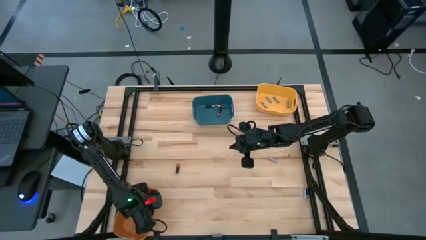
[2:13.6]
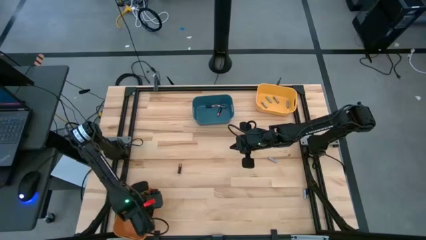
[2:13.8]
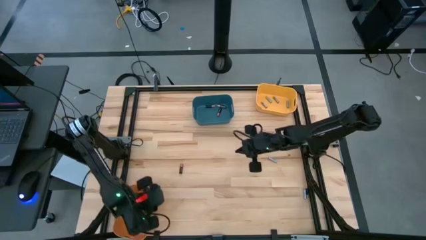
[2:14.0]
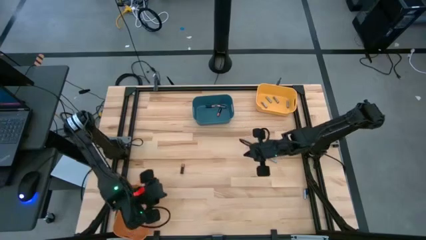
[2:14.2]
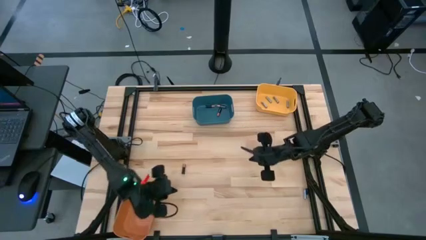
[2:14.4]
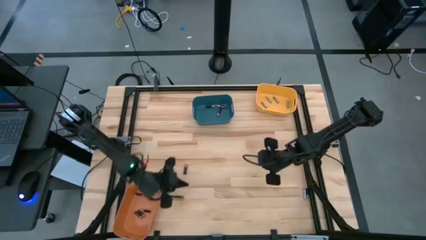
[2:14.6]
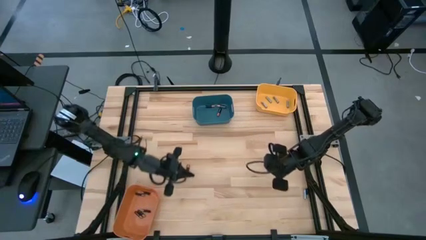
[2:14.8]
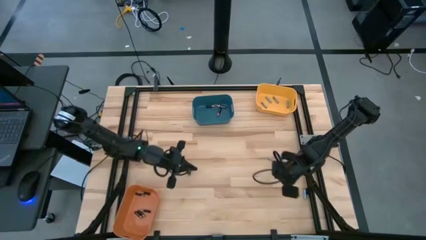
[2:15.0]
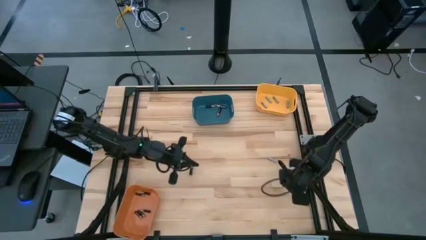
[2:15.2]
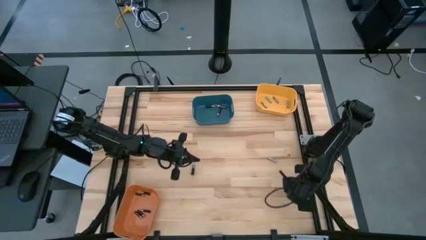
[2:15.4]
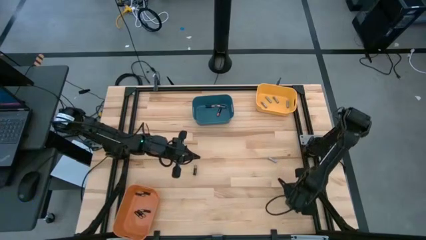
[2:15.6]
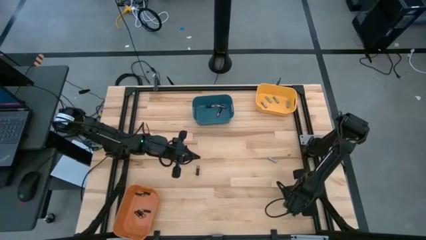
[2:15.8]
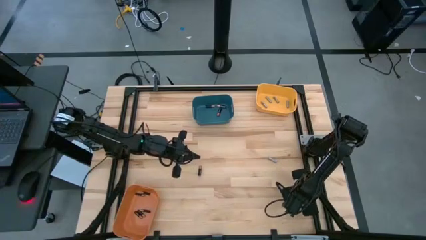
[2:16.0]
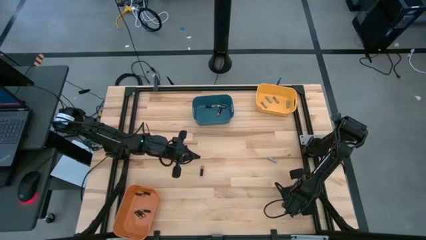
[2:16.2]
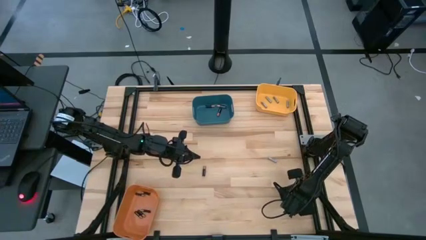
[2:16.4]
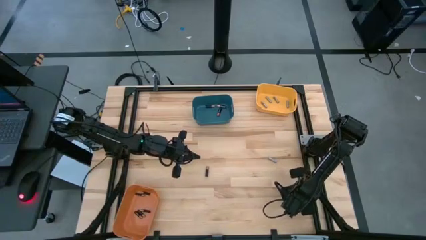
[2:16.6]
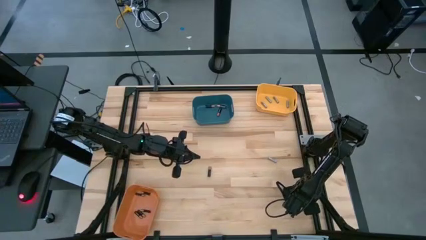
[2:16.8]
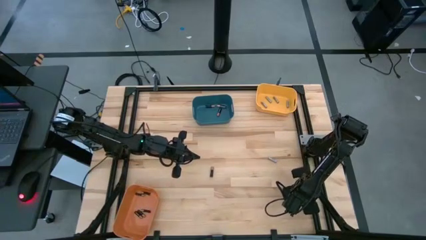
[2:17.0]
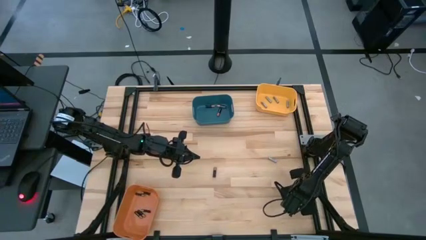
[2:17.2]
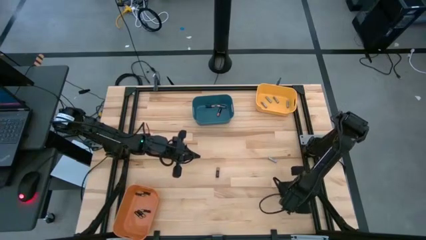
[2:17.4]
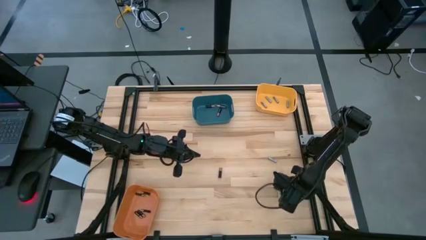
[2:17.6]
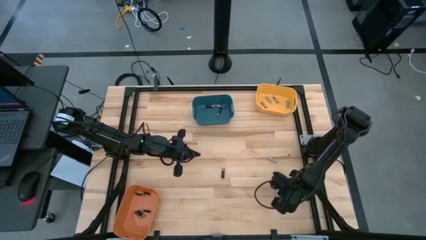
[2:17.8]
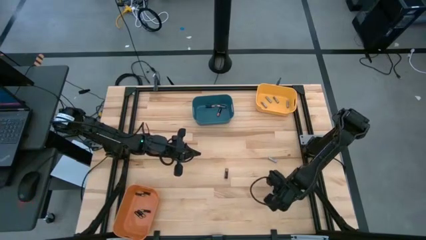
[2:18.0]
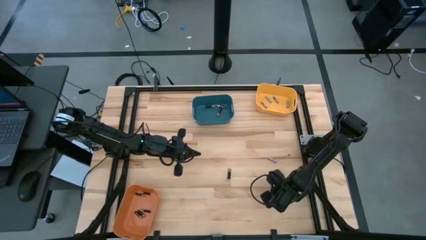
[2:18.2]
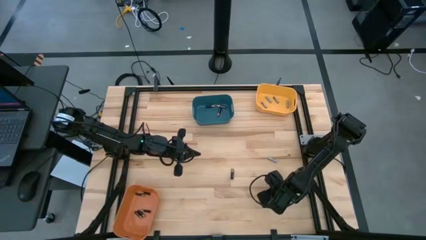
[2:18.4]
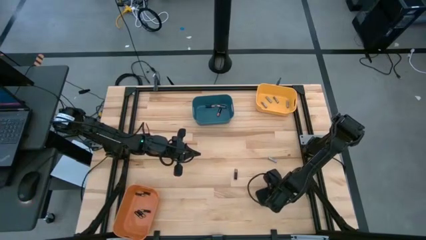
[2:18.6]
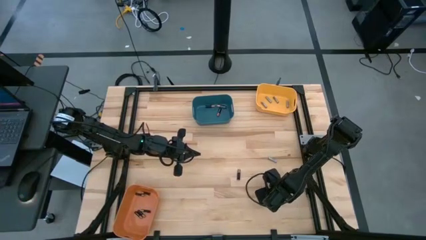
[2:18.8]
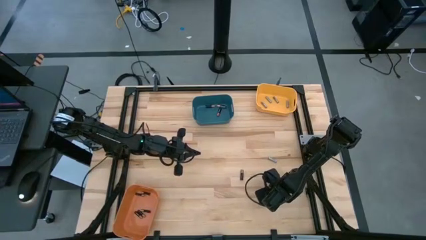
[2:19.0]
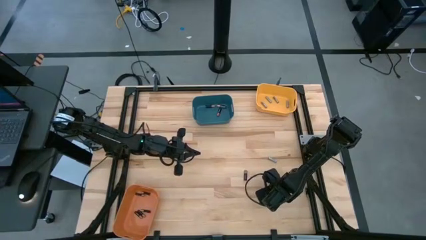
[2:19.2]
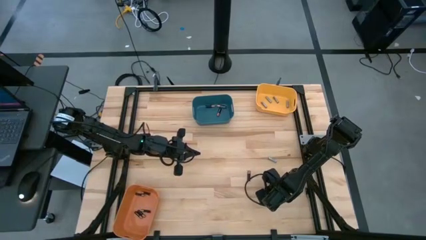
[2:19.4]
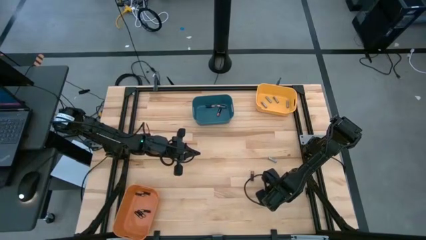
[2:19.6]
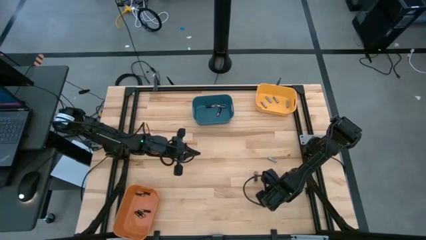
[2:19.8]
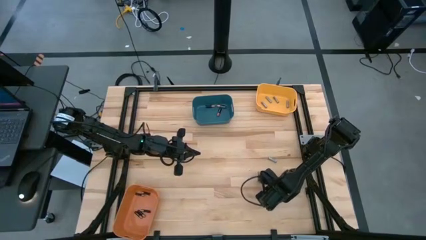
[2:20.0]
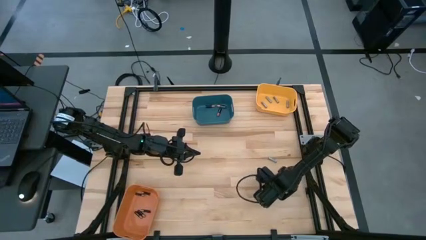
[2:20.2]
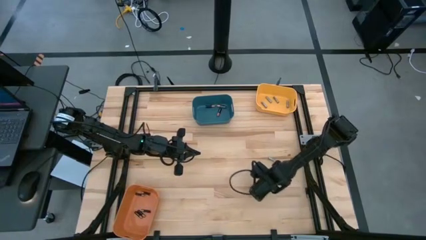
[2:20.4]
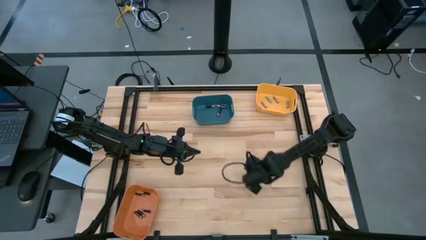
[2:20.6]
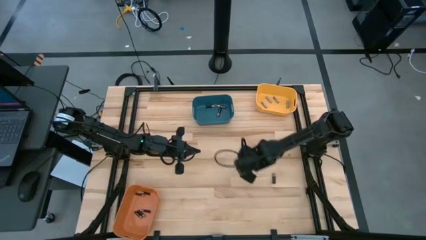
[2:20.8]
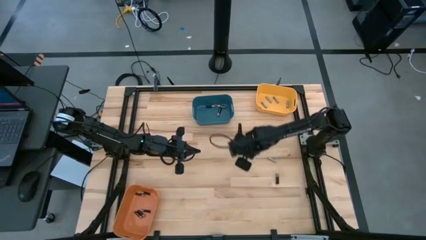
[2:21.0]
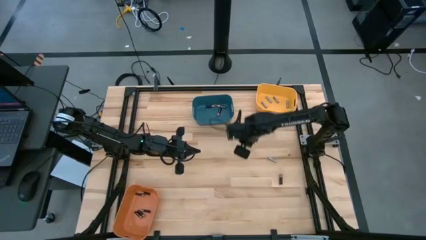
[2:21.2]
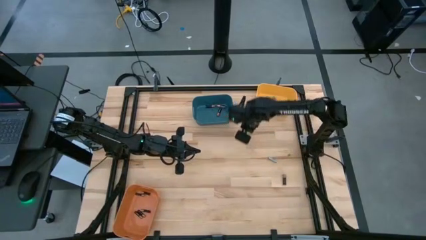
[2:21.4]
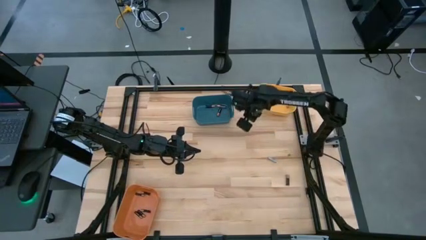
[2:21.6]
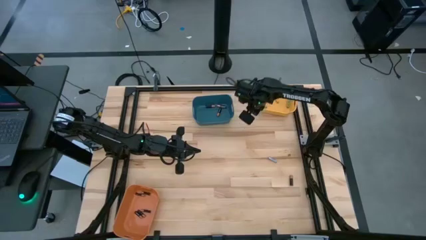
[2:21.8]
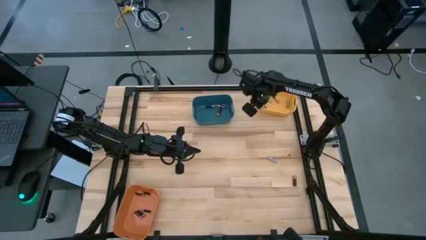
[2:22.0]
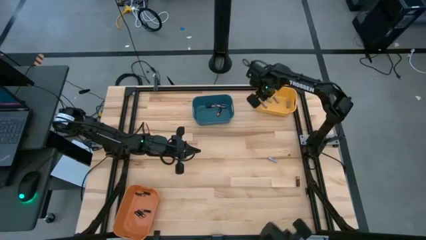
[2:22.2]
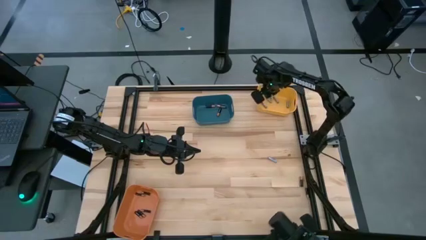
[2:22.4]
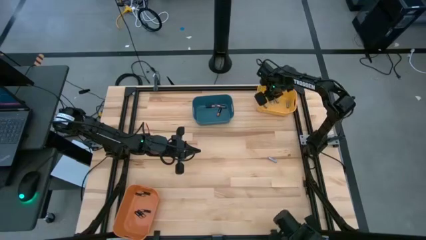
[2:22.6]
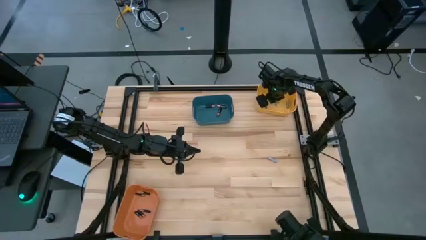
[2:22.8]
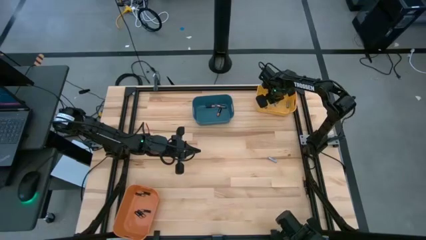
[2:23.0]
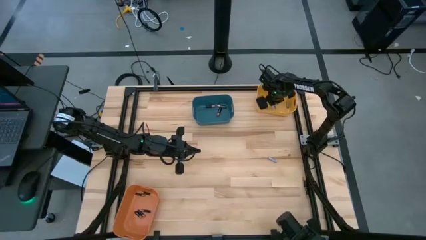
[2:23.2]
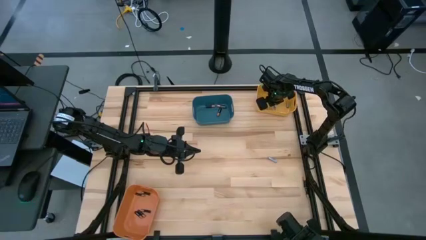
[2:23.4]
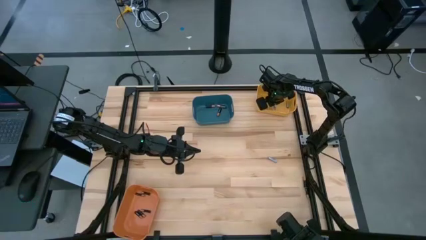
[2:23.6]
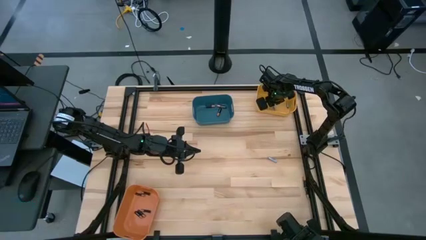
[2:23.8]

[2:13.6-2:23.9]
Task: Sort batteries
Put the white battery into the yellow bin

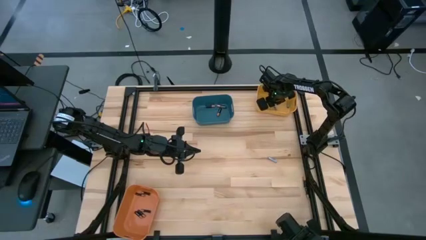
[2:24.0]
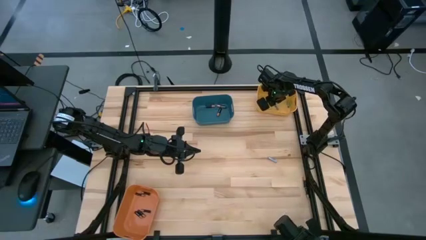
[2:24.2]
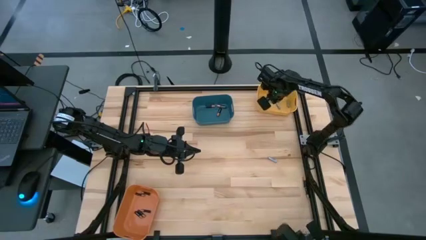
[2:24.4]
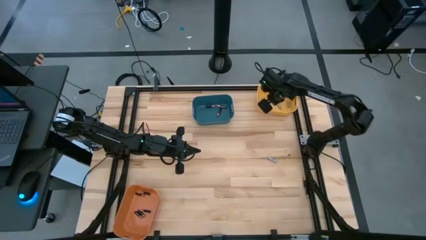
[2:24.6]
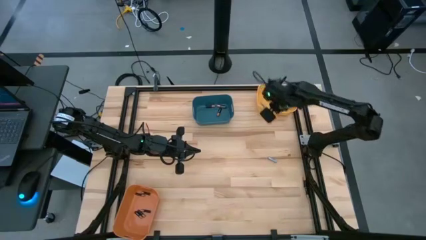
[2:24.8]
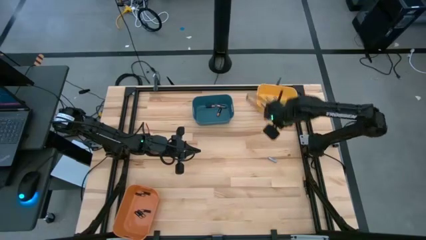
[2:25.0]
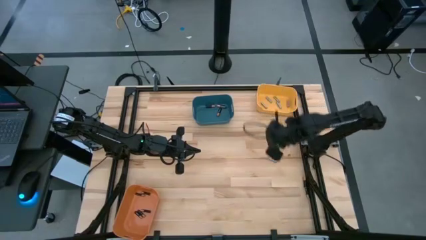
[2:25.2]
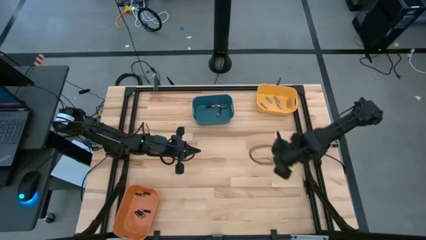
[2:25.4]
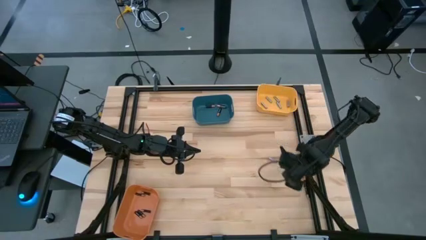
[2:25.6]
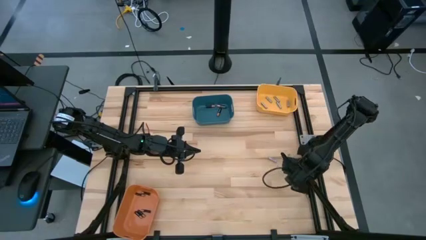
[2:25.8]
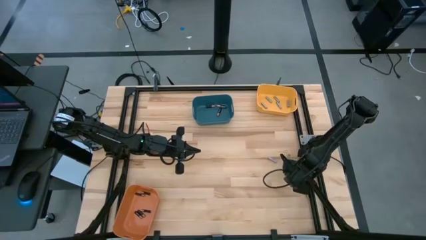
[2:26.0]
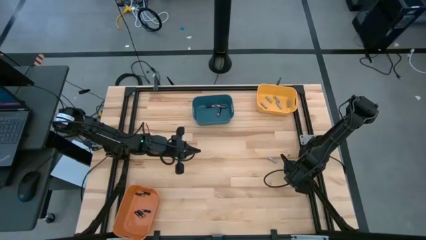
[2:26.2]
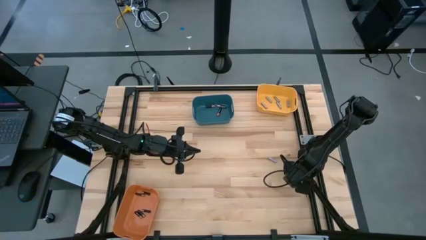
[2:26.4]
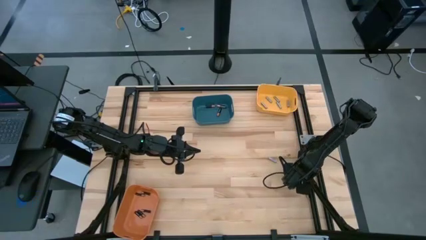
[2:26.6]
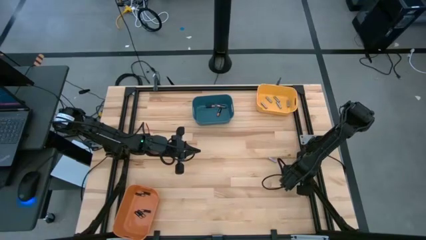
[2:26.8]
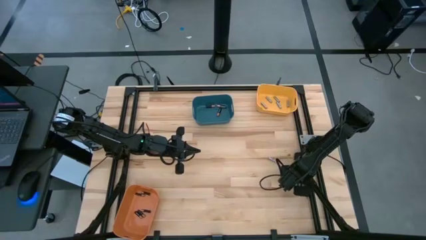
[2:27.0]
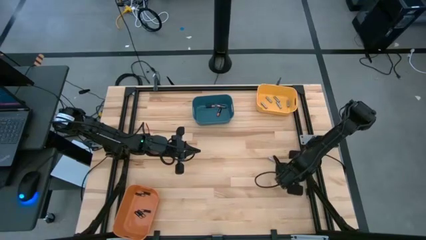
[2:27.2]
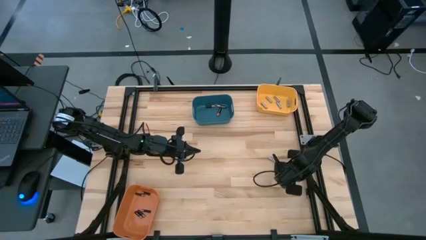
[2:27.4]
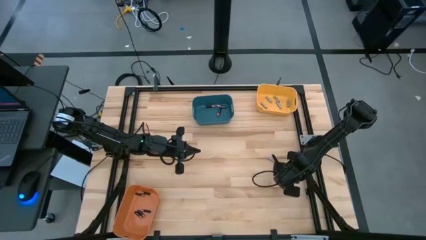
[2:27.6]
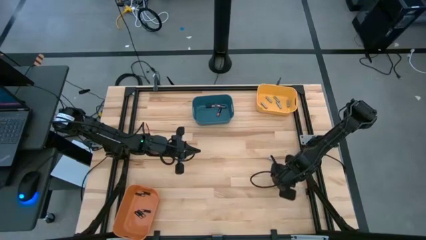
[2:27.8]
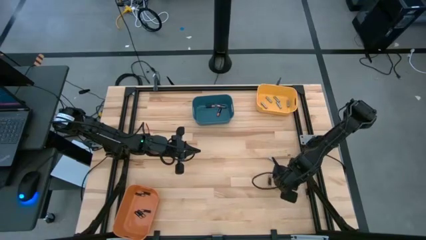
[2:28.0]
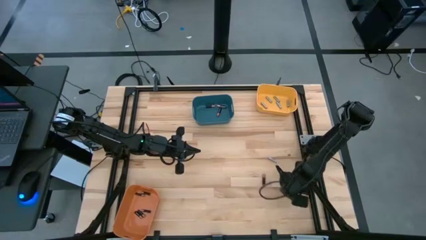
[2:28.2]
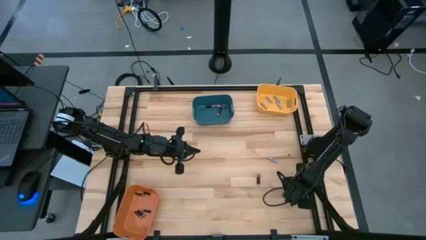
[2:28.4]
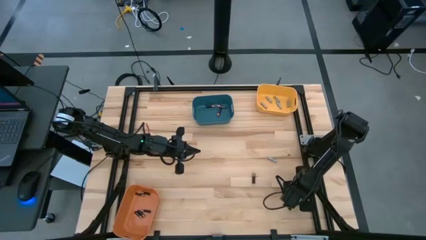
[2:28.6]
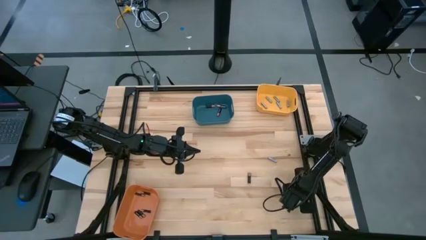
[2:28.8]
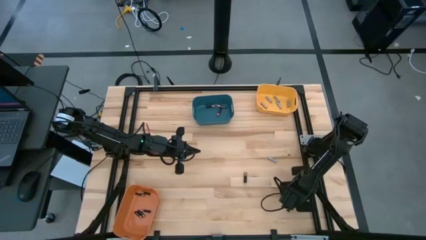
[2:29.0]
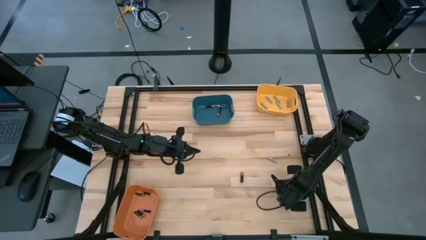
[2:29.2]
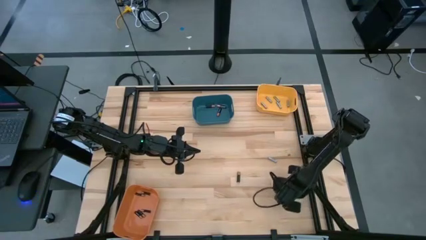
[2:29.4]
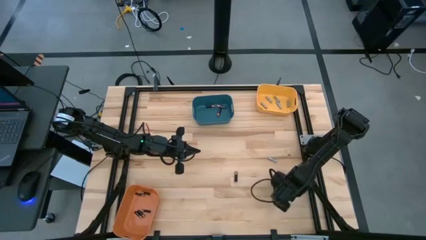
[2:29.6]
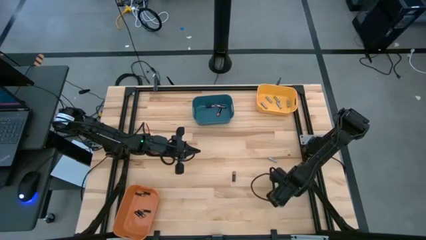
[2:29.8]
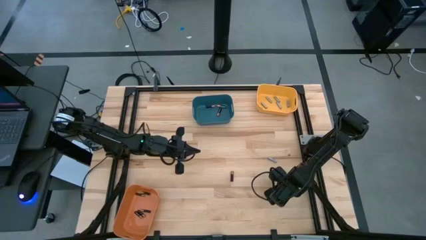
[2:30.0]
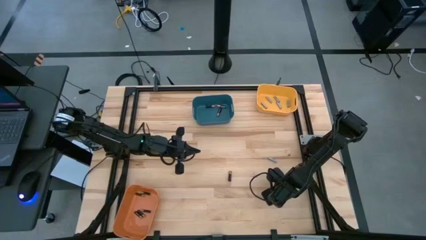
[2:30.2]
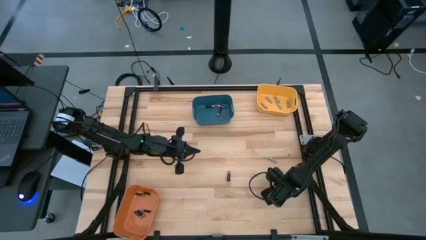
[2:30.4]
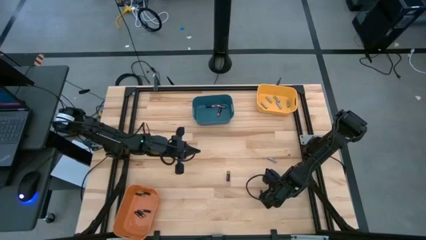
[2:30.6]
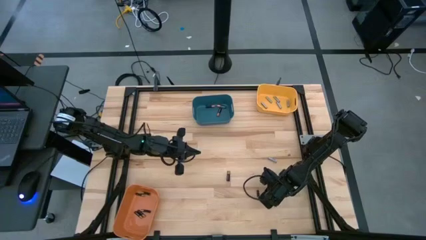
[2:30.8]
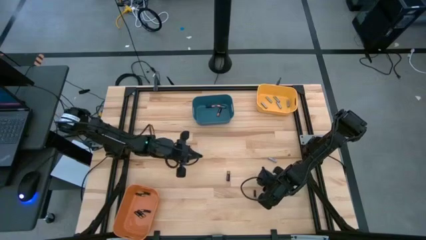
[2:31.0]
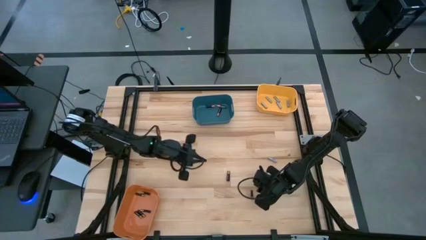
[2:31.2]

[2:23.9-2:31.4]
Put the small black battery into the orange bin
